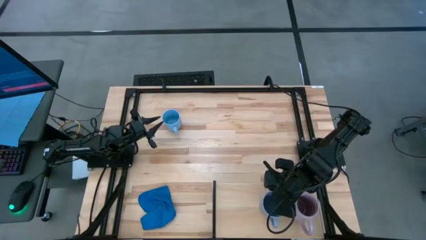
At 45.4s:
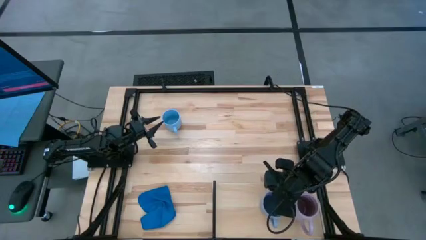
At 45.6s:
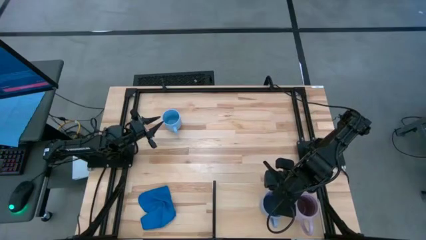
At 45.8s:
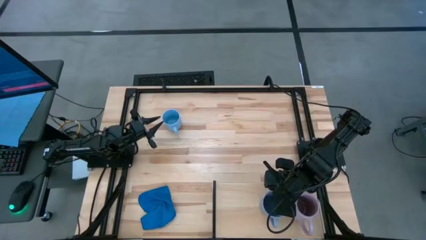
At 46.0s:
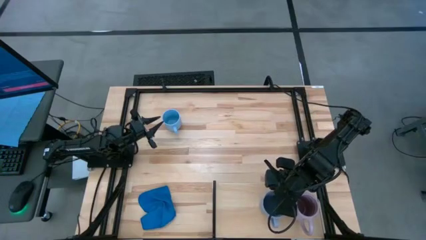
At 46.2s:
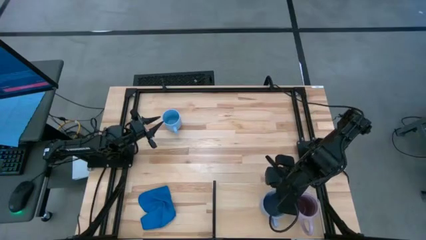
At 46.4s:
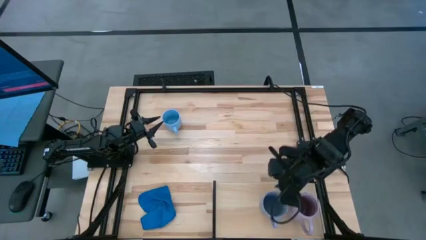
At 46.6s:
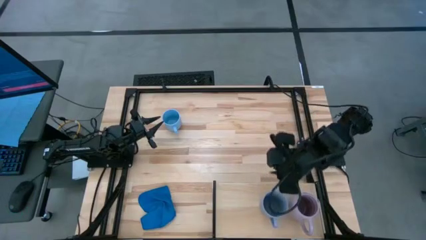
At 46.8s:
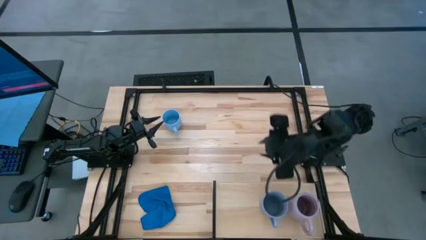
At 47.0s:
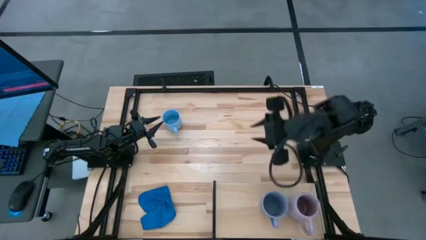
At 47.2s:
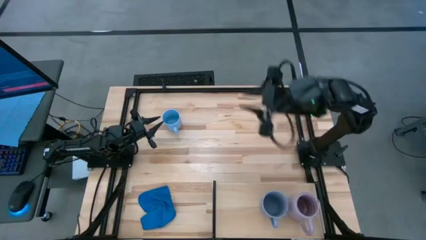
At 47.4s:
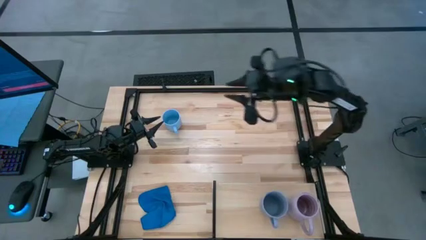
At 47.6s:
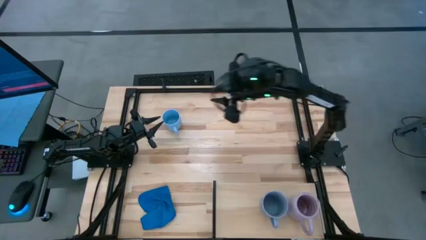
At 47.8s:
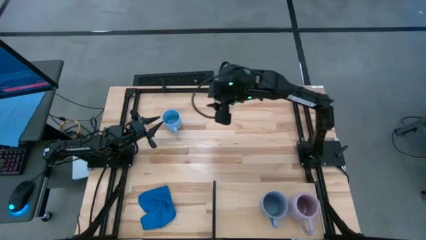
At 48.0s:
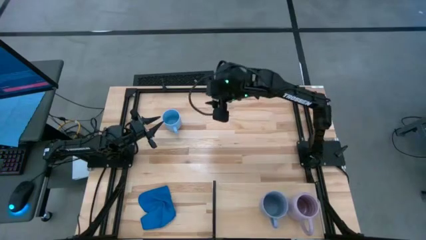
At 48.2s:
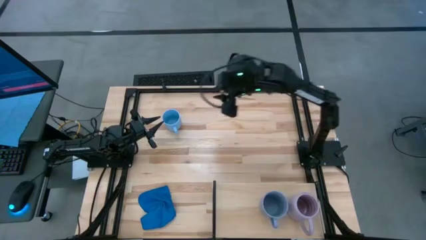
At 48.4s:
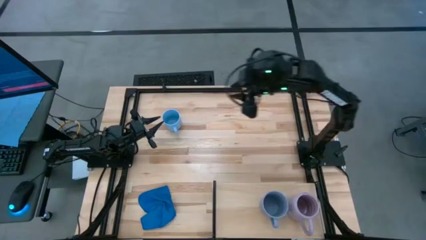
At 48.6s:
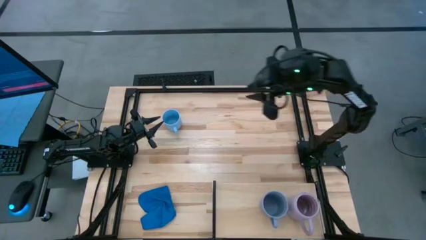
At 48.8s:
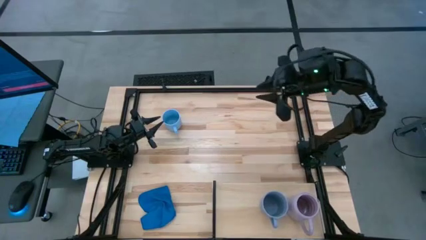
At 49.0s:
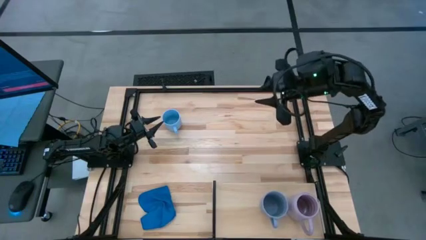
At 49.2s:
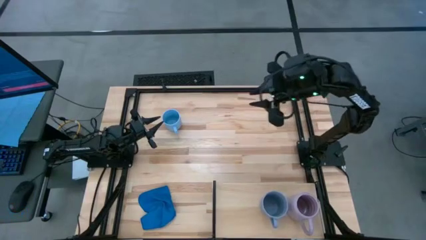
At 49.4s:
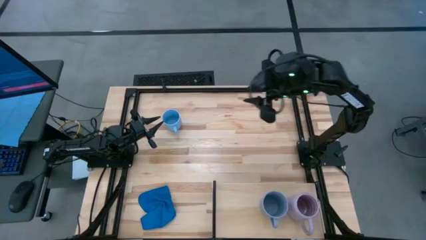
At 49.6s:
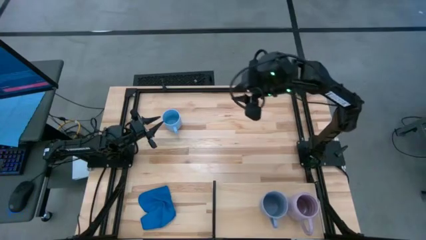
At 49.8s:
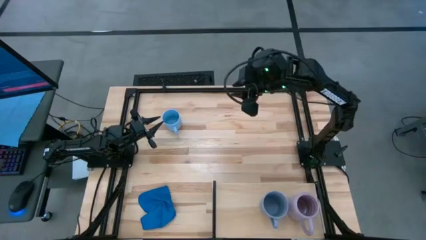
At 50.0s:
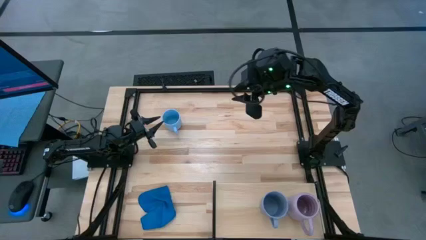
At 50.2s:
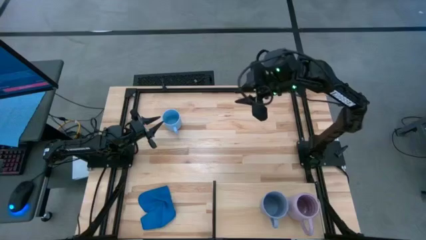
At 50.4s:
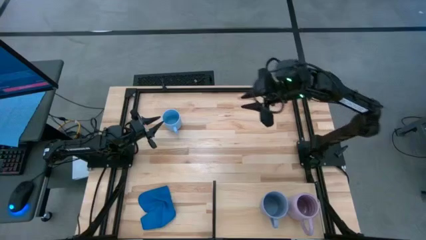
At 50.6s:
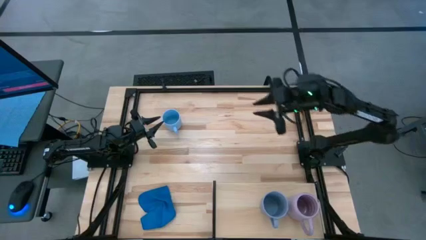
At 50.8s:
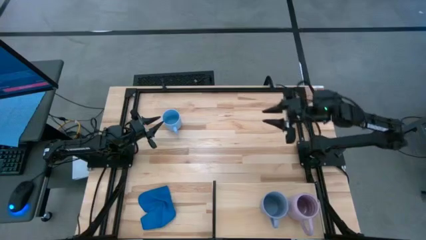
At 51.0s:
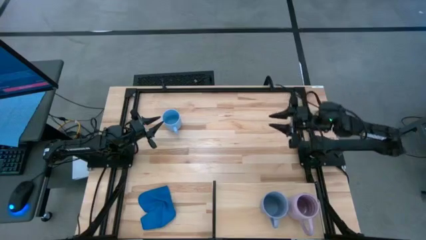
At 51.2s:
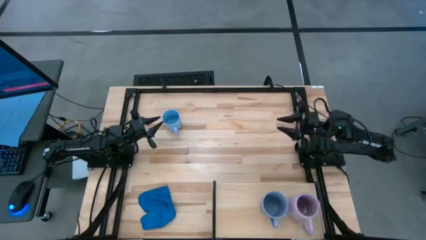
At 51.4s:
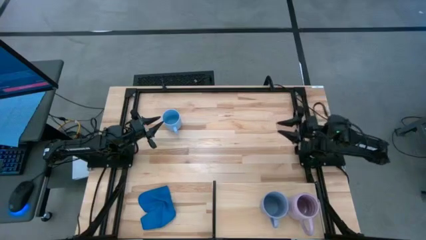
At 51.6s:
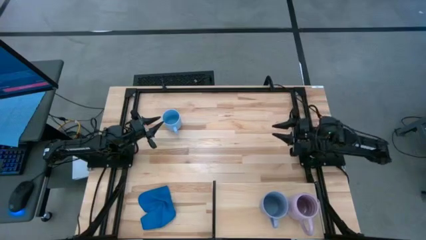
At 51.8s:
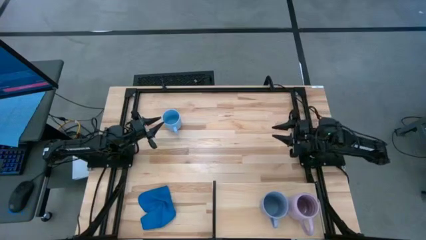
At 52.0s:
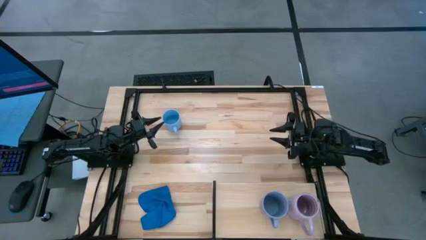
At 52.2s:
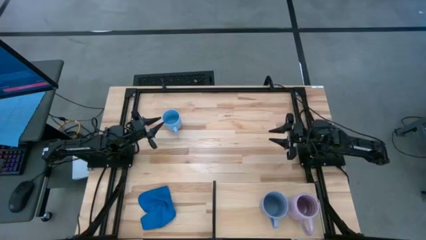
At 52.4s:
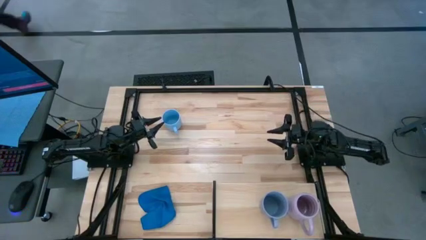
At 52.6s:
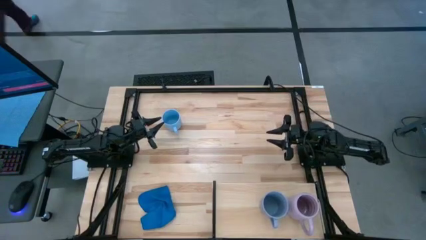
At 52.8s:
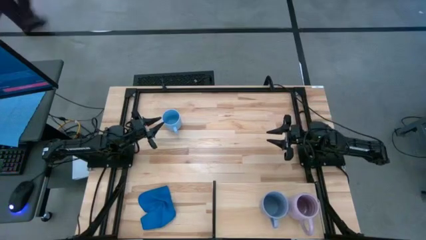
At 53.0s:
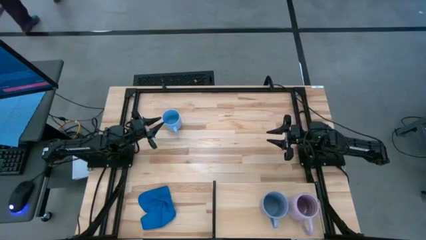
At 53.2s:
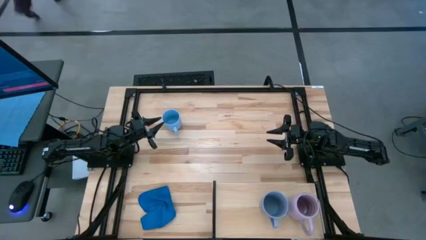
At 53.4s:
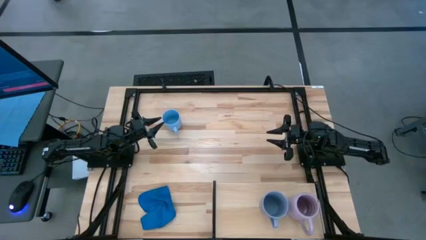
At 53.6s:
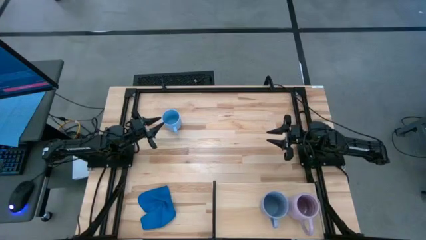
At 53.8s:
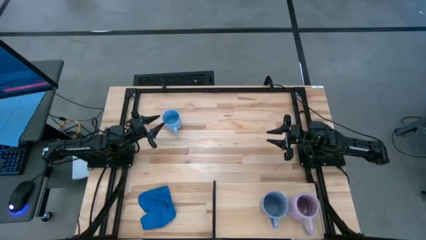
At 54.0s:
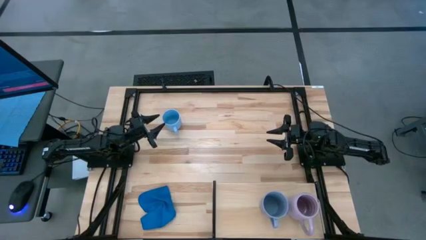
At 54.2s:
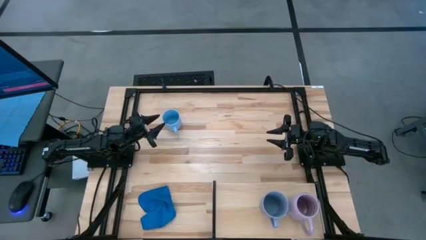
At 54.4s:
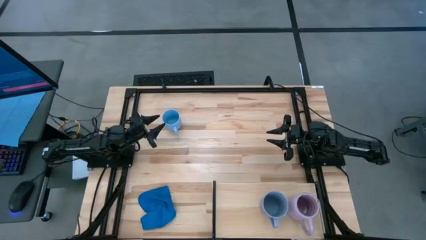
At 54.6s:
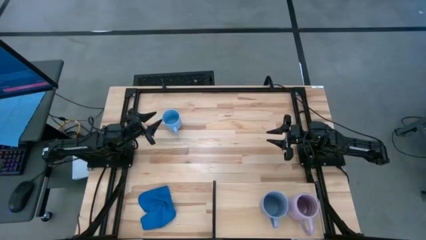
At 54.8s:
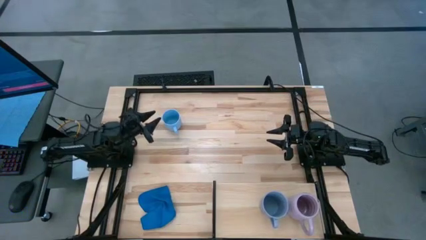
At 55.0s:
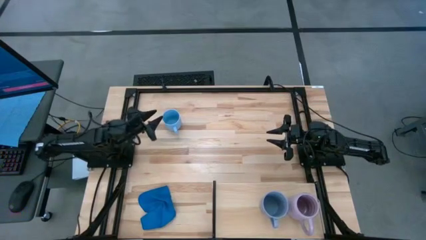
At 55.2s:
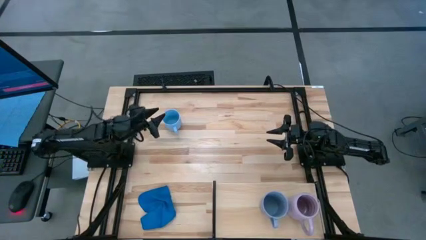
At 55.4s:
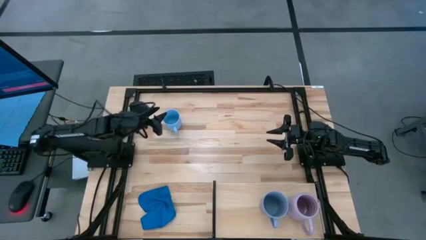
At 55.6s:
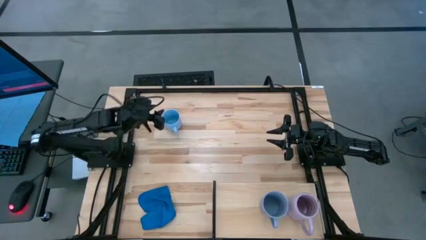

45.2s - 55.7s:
Task: Stack small to large cups/mugs on shelf
Put the light blue mug on the shelf
